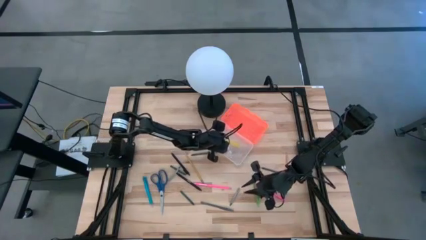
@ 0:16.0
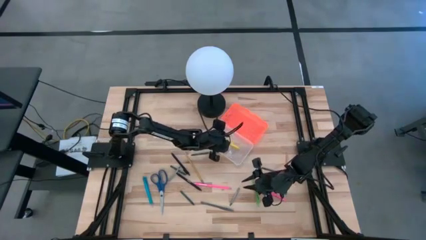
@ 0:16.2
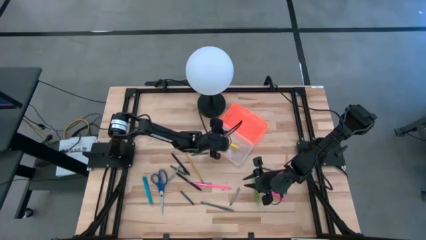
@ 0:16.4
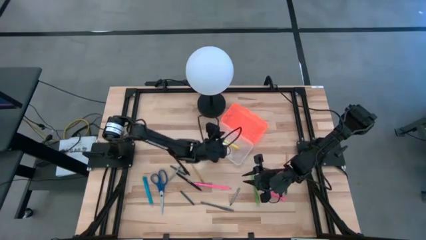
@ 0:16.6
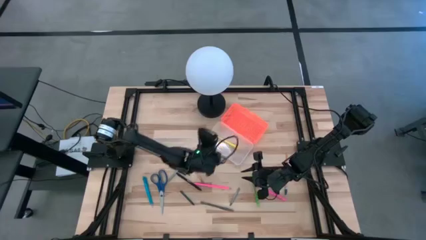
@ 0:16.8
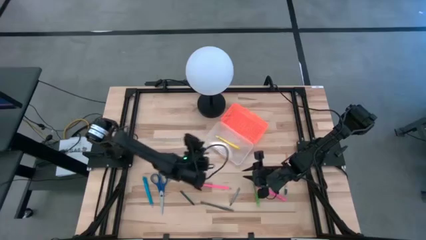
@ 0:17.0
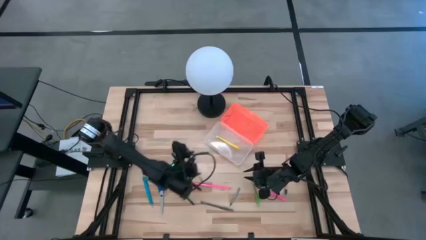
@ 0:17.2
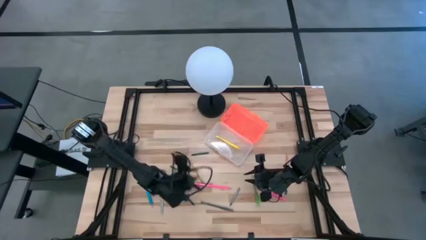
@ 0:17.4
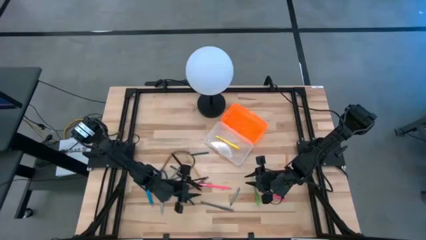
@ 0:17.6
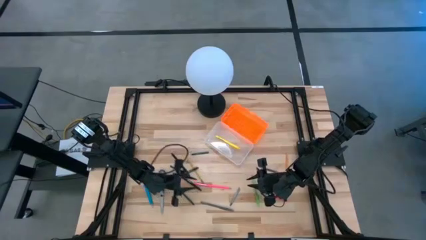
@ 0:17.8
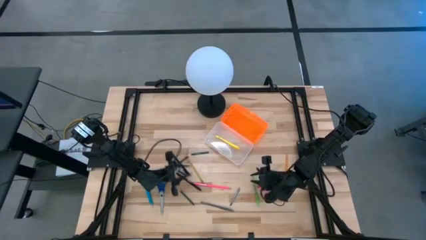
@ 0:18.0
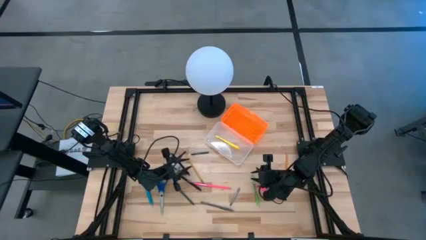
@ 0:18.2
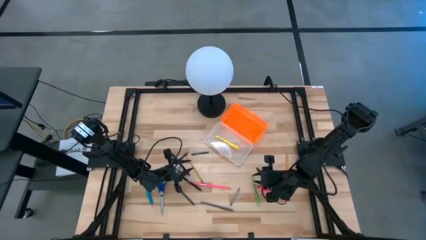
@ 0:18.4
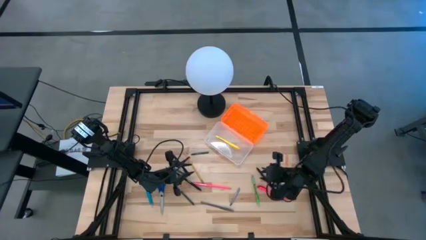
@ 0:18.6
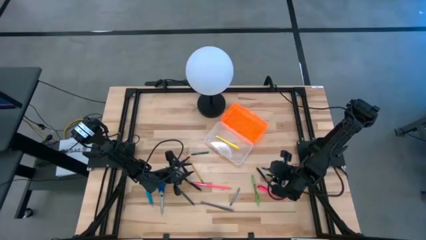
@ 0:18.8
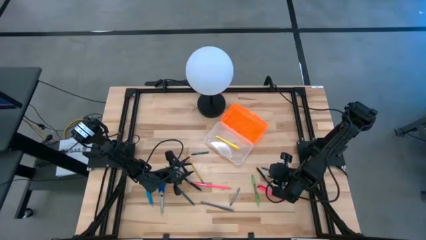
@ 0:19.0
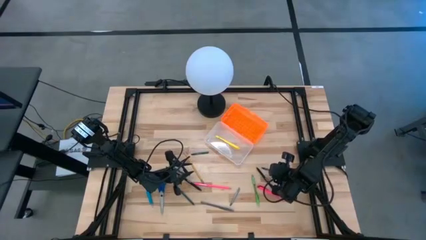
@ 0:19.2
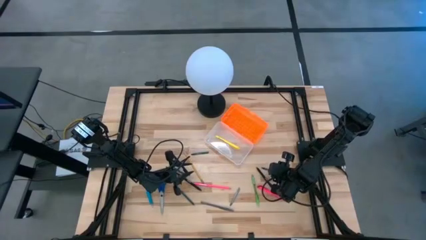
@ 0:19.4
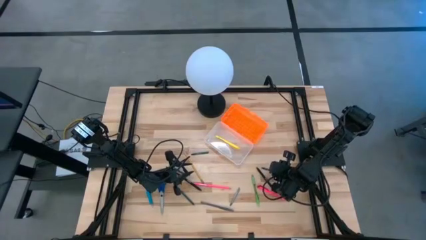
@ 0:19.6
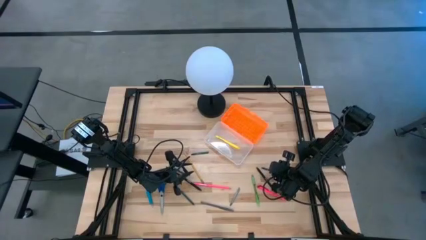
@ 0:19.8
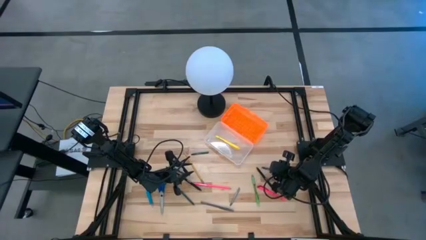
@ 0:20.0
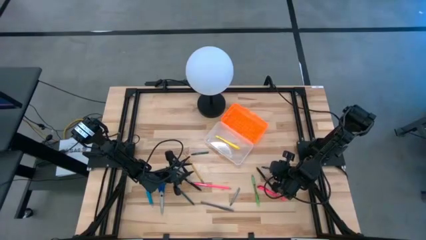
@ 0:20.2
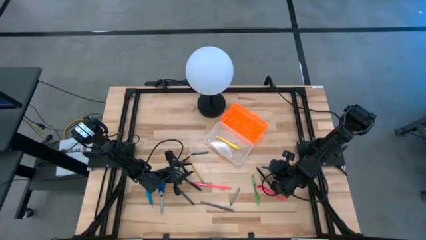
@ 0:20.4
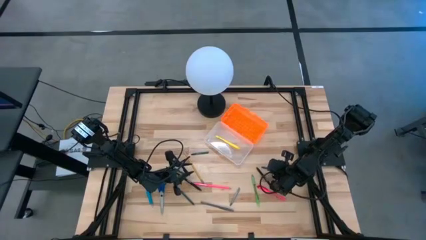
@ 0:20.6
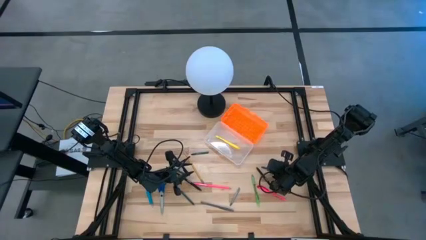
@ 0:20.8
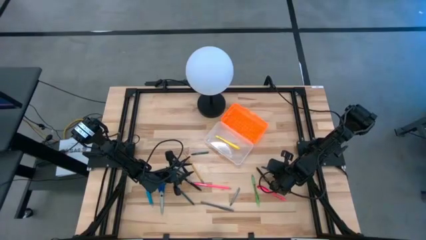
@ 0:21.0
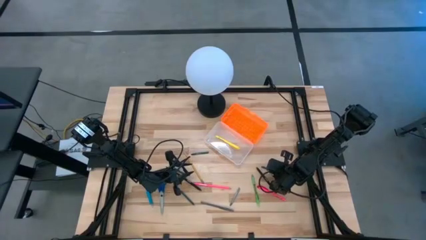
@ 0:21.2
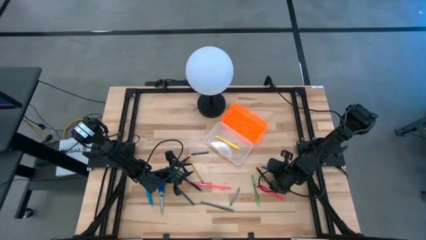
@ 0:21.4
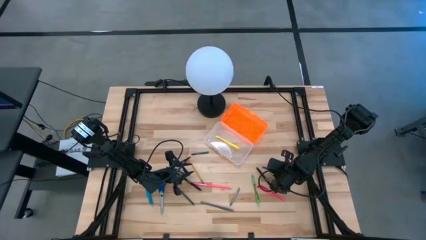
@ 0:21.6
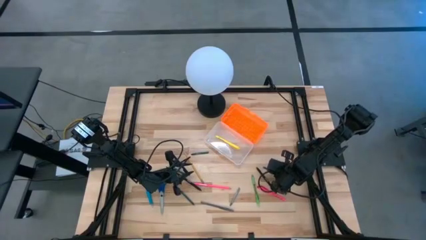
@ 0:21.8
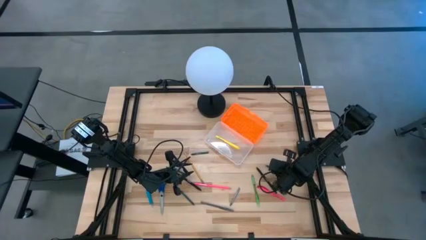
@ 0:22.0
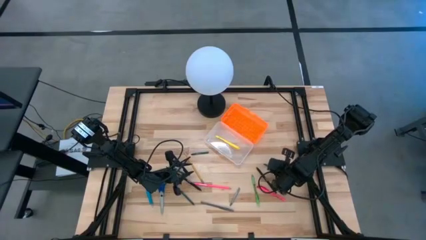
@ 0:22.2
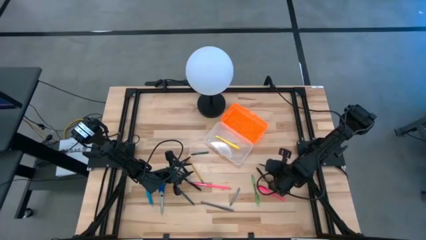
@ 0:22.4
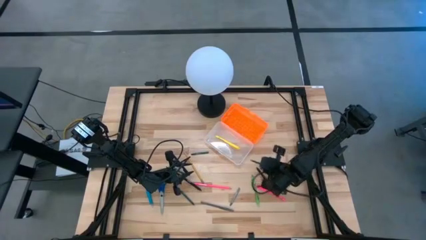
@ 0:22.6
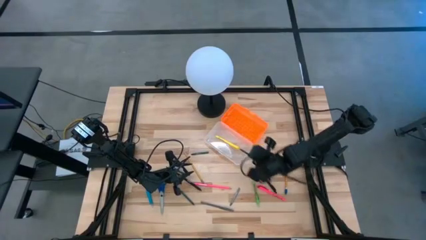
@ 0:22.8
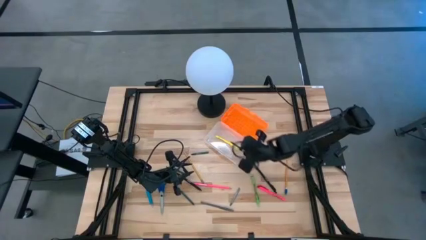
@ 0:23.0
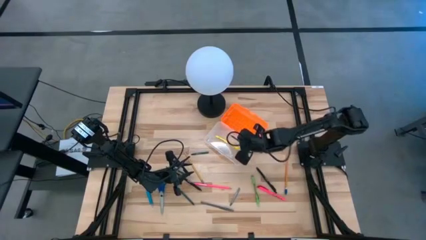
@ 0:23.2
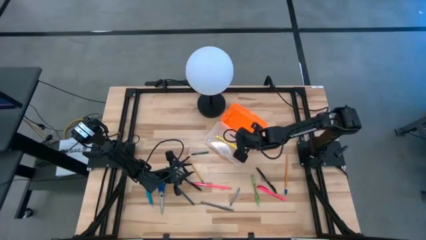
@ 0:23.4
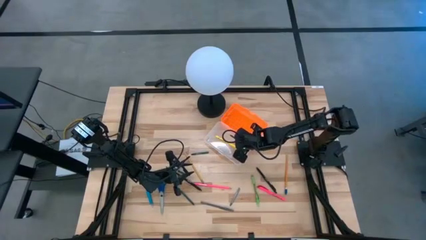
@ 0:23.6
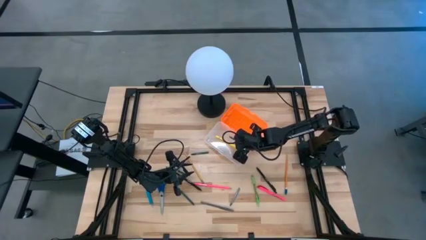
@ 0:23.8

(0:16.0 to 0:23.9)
Task: Pick & place school supplies into a supply box
Put the dark green crayon into the orange supply box

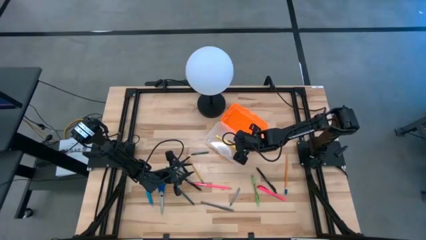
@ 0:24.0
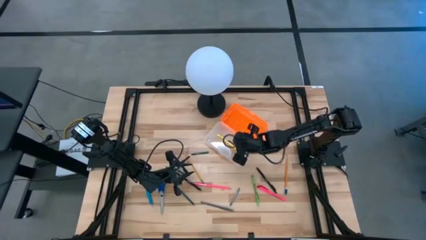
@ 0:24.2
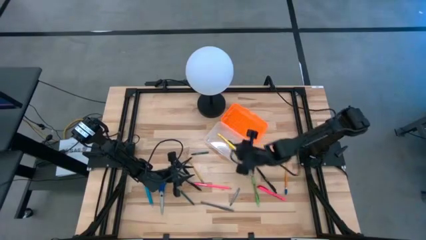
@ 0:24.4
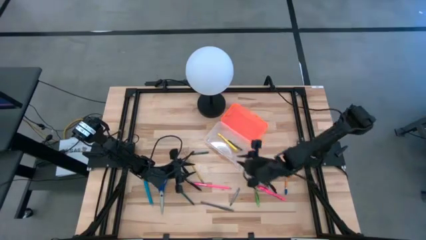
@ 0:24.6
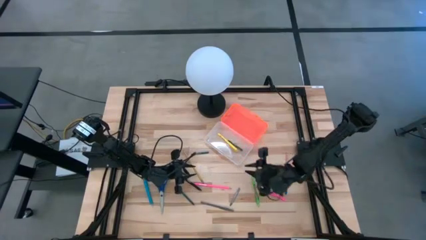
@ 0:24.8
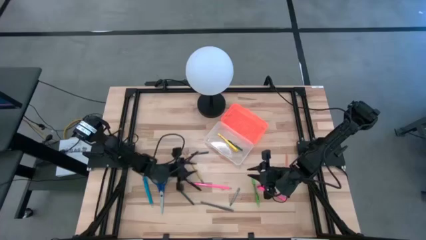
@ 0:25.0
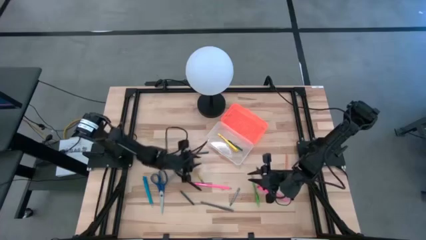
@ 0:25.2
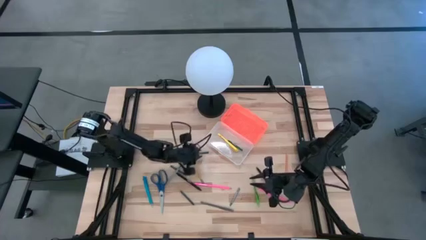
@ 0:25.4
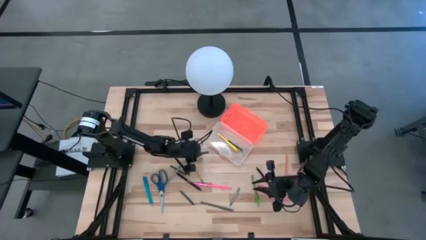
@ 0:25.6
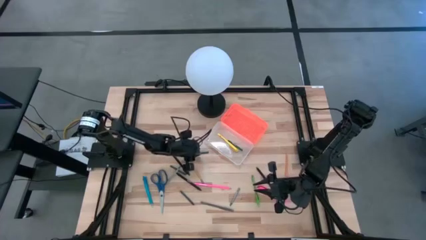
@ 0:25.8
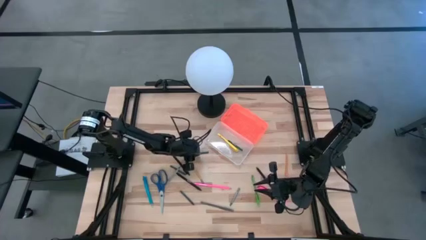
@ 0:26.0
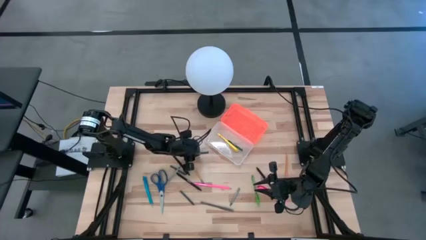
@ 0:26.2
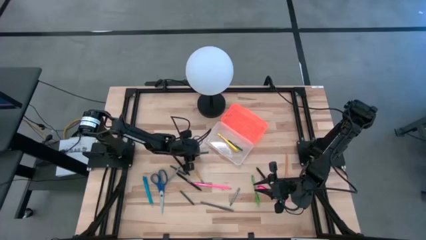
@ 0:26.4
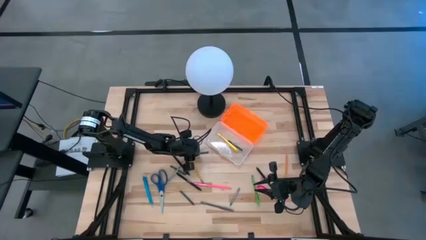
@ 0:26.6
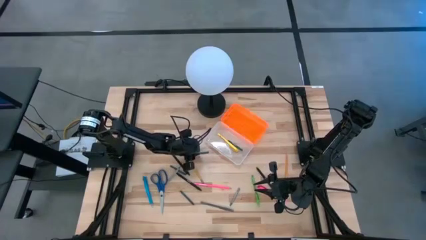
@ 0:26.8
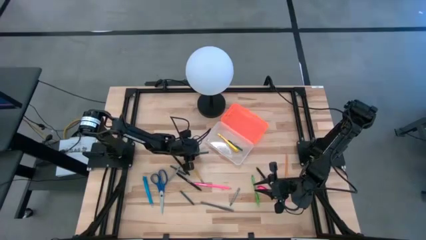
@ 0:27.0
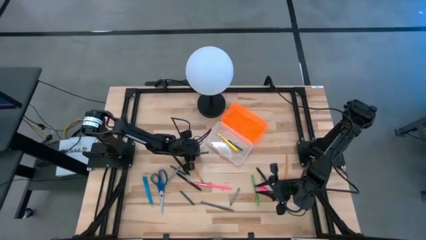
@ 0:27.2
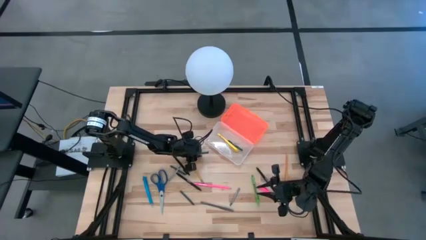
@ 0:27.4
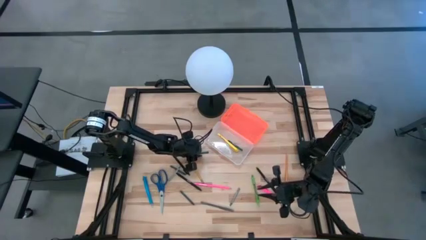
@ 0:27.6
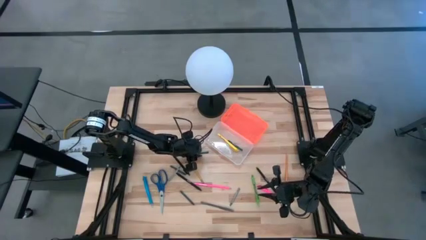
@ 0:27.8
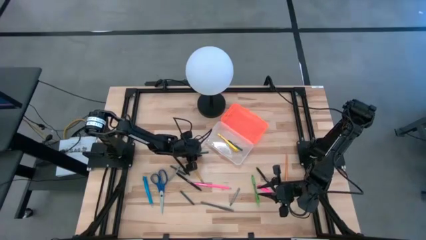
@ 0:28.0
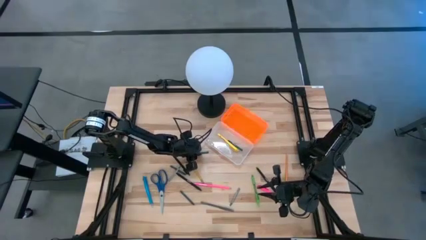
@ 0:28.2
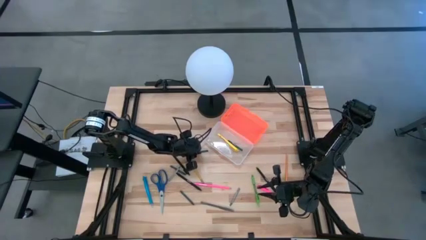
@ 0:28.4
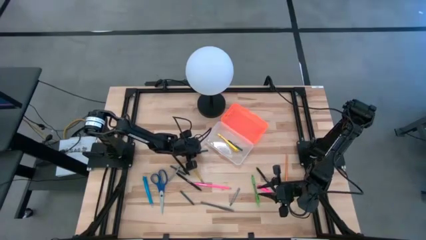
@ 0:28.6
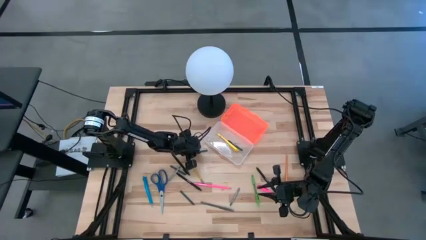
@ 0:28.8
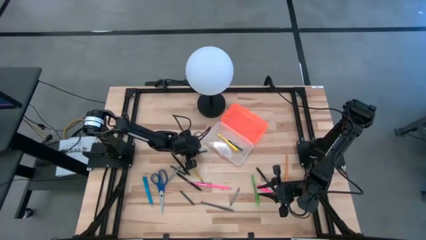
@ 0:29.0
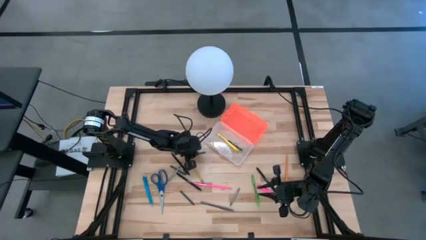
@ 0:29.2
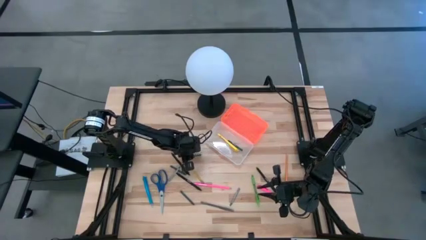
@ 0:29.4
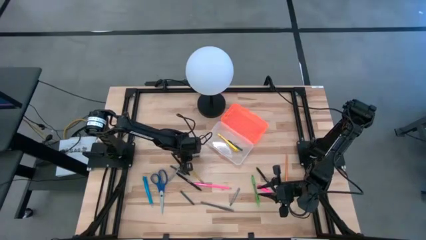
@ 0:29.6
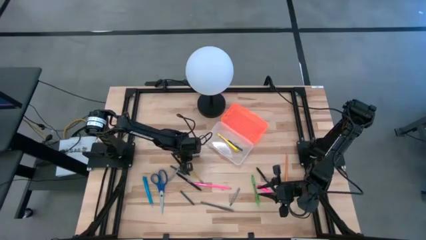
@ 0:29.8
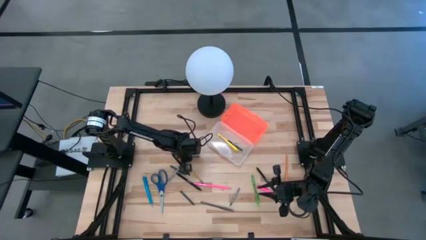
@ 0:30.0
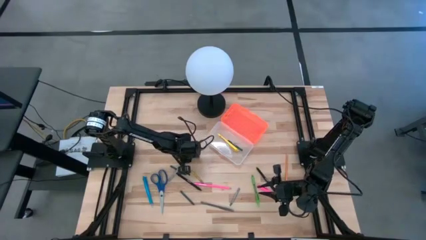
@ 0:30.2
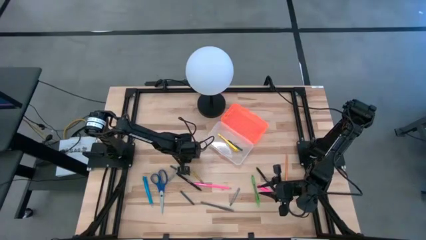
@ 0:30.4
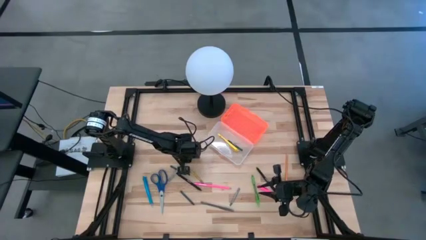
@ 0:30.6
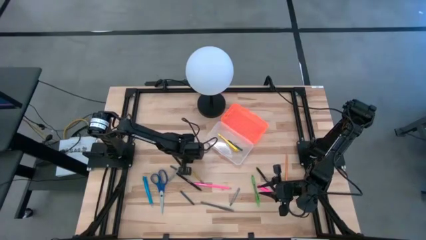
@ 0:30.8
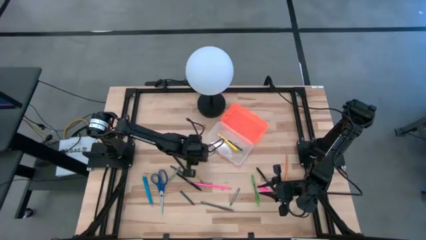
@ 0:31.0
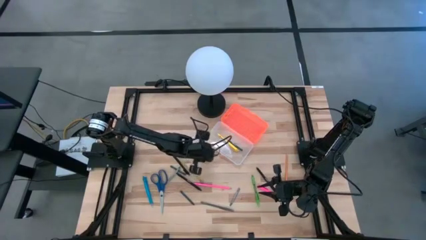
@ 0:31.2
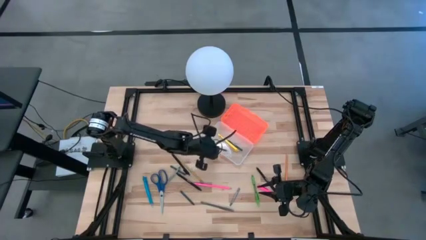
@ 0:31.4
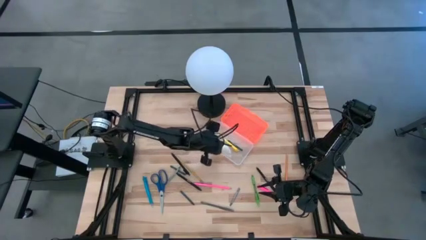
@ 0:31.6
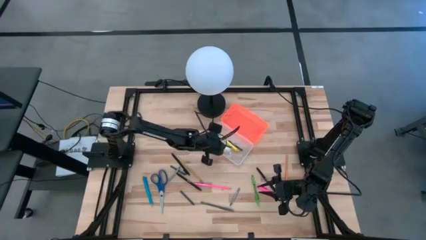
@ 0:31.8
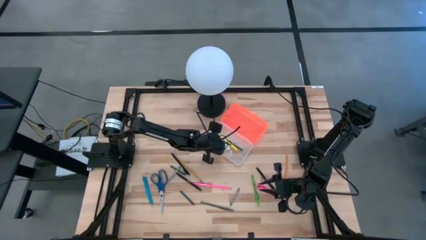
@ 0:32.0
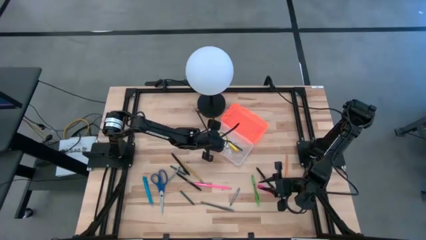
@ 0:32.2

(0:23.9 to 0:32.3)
Put the dark green crayon into the orange supply box
